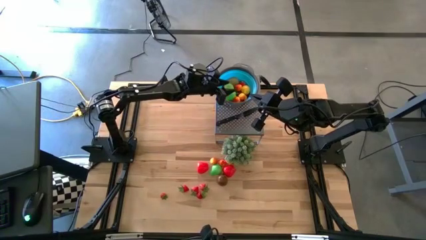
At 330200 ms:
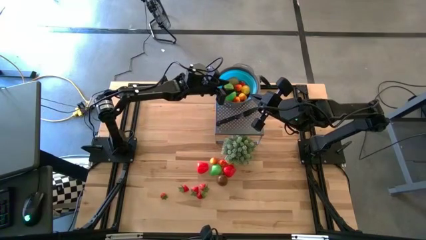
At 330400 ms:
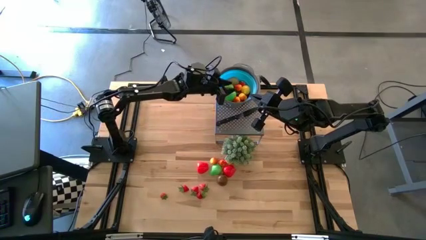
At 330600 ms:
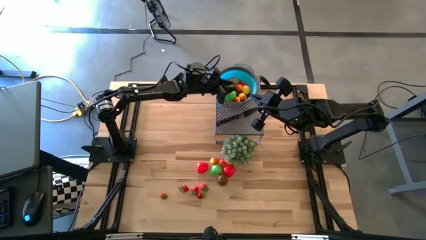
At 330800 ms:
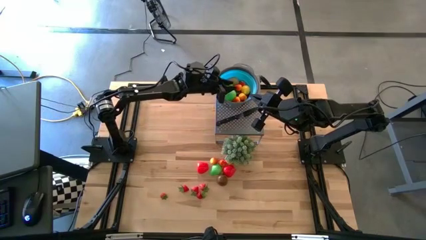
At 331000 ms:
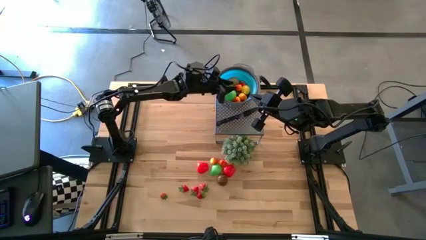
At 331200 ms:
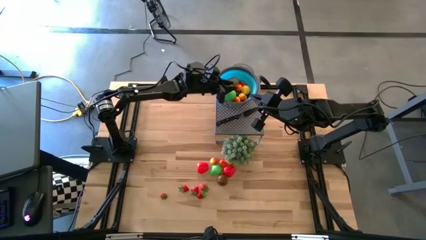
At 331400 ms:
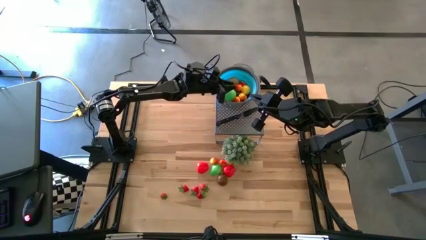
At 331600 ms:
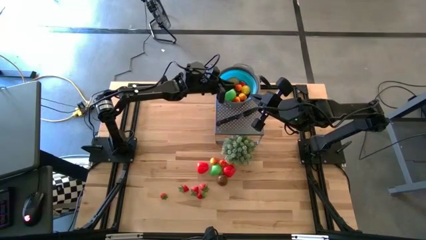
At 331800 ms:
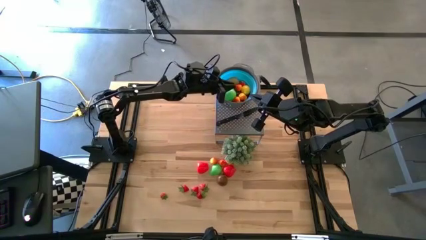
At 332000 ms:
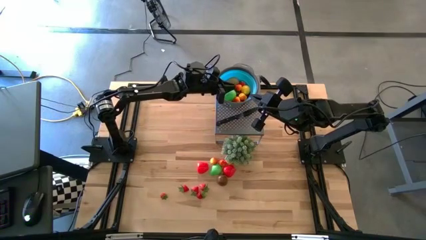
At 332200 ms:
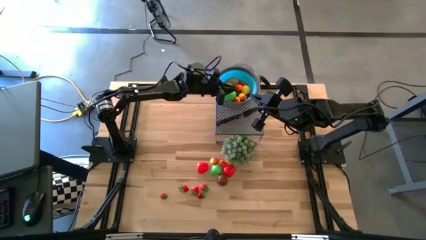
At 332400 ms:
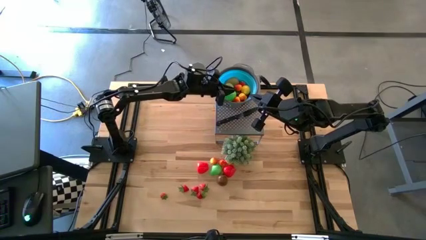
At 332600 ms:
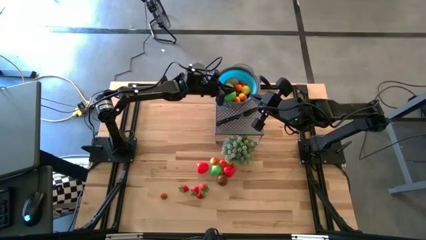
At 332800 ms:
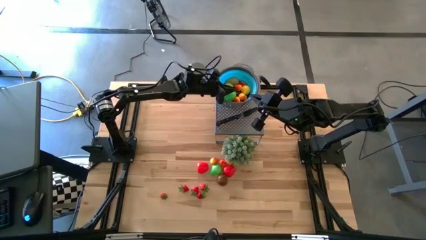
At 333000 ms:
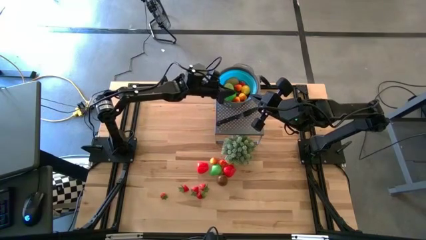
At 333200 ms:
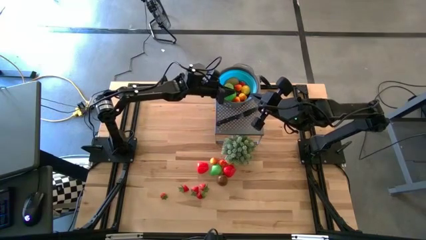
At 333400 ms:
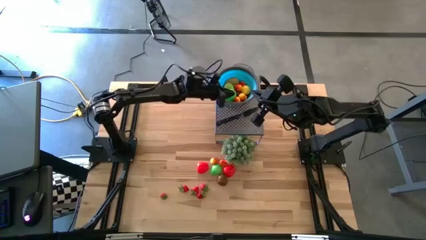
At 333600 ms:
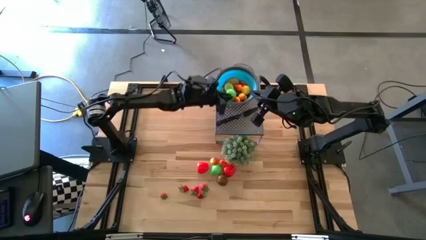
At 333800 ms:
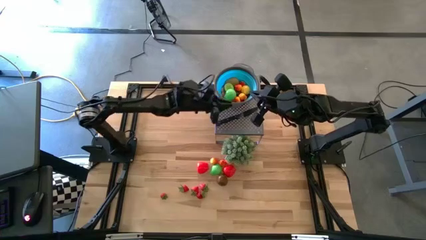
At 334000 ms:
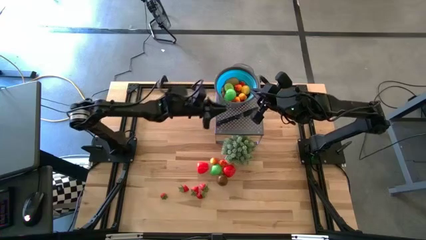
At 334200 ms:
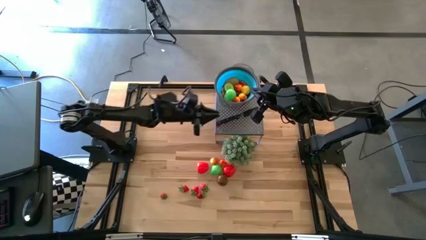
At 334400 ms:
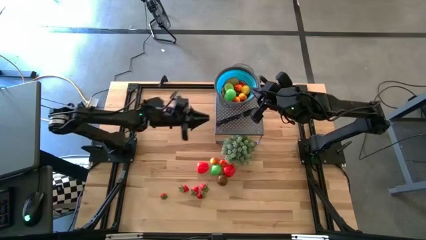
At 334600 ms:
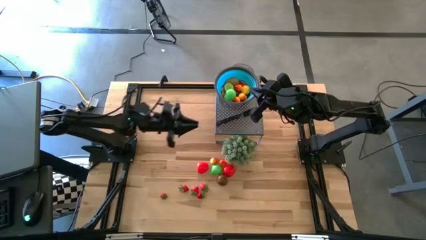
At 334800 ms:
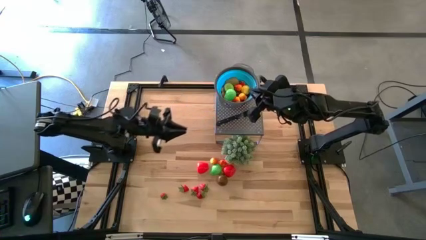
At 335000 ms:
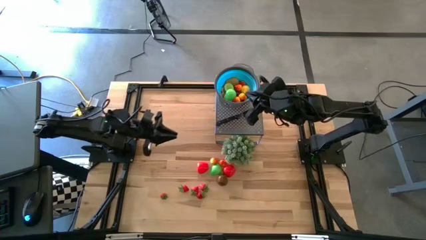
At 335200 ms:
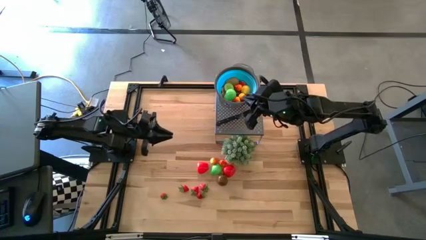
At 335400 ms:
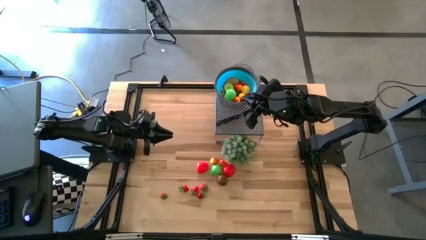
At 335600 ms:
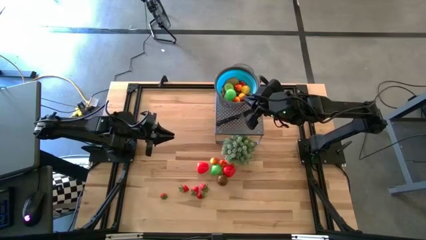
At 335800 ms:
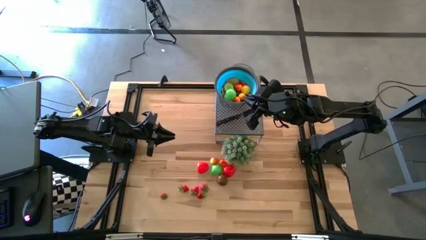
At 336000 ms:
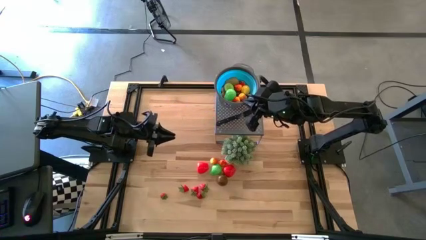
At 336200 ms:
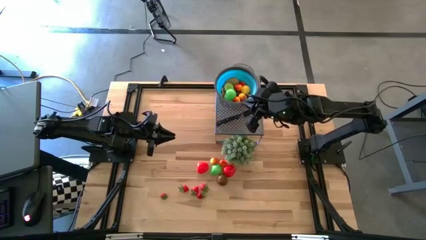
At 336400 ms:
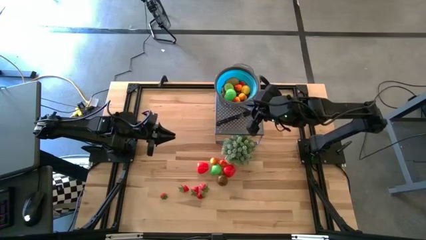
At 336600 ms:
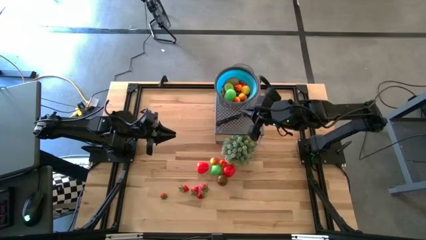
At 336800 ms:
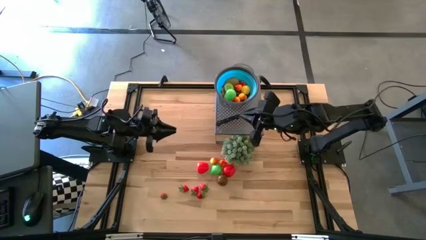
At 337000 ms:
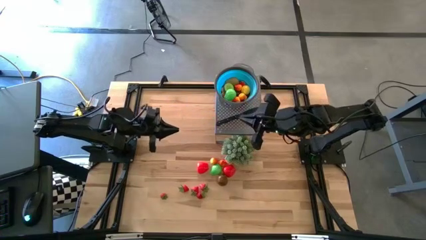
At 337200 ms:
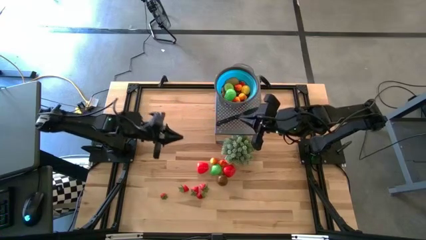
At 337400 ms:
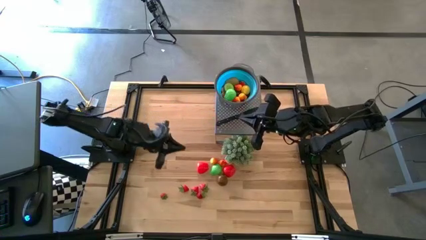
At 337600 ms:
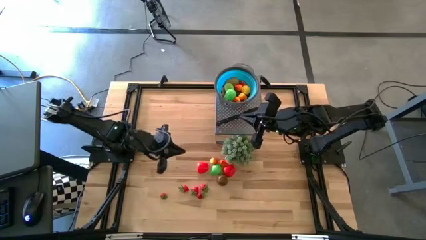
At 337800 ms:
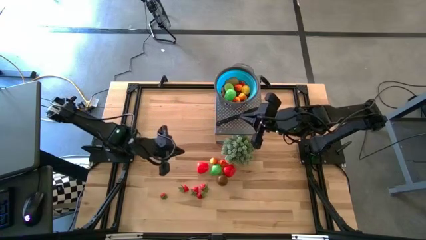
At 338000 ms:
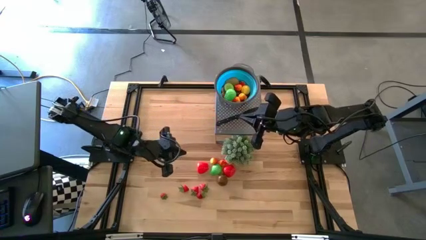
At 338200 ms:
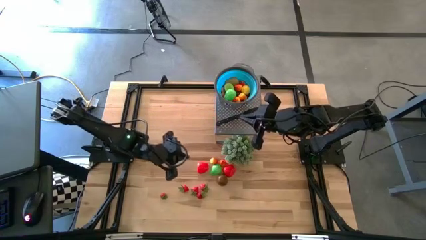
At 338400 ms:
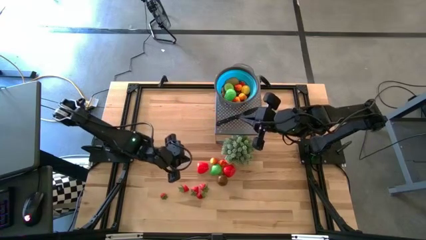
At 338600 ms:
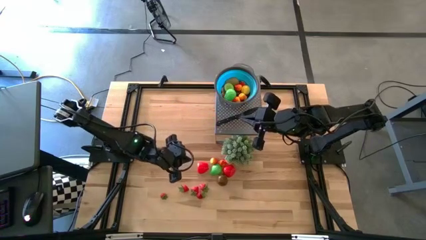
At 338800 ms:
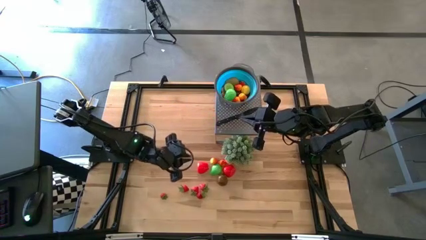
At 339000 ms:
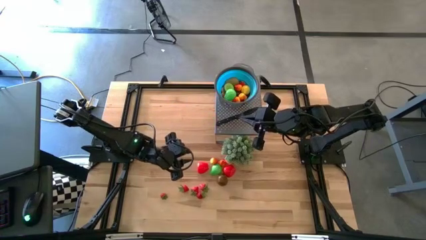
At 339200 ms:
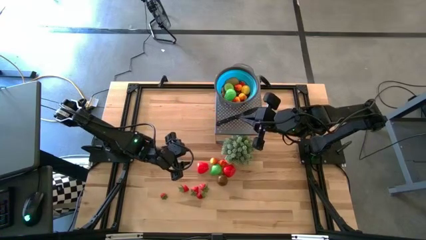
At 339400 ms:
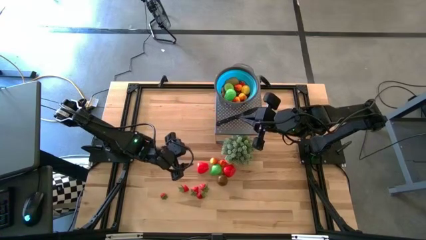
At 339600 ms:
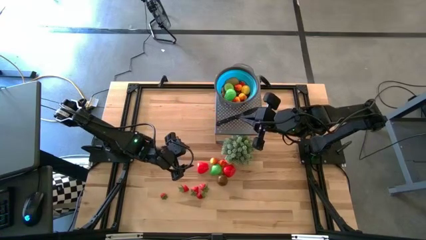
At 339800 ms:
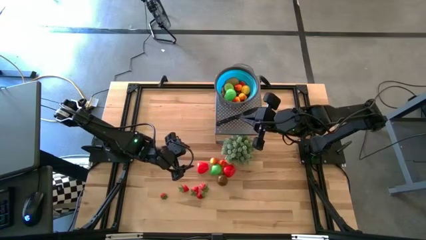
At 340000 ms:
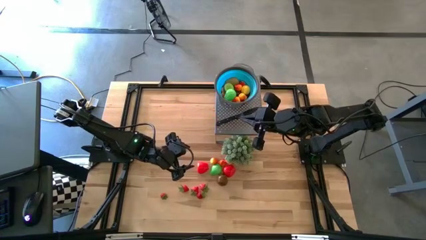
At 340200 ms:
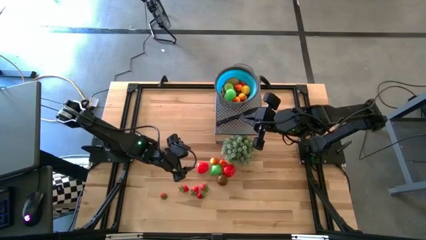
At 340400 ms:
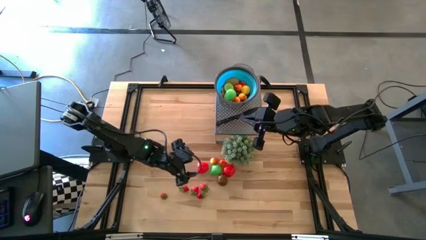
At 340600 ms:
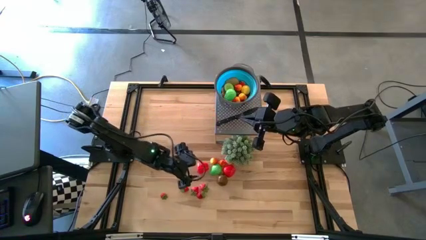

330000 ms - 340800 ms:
Task: Pick & Place Fruit
Put the red apple into the blue strainer bowl

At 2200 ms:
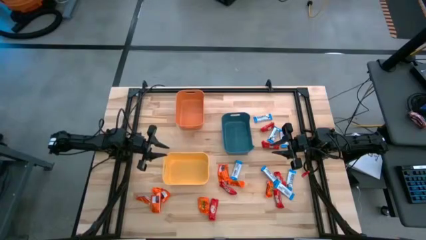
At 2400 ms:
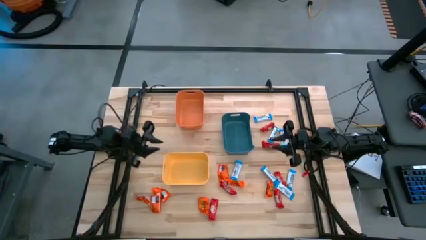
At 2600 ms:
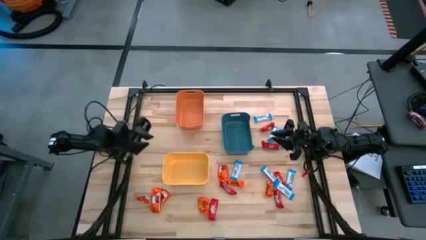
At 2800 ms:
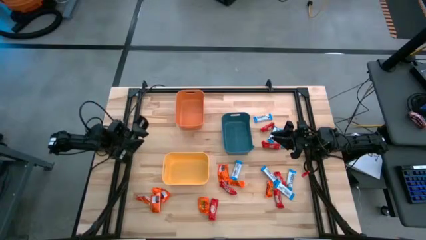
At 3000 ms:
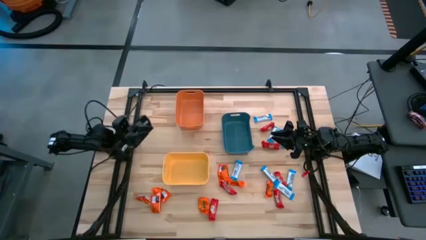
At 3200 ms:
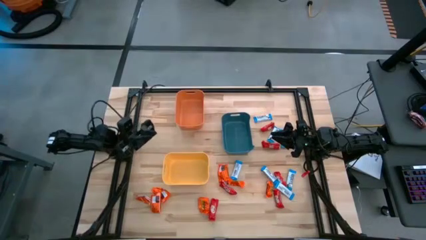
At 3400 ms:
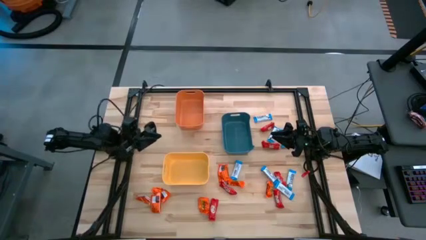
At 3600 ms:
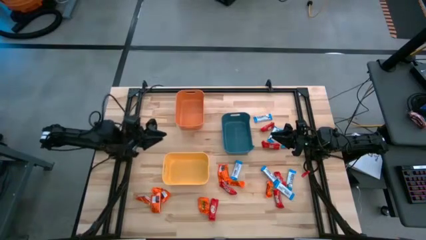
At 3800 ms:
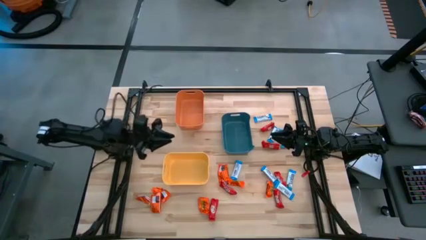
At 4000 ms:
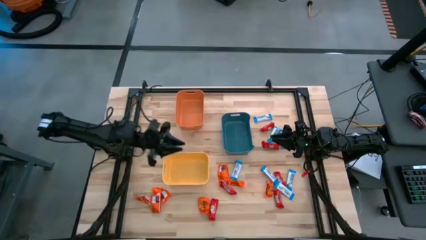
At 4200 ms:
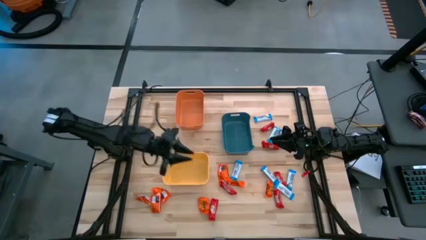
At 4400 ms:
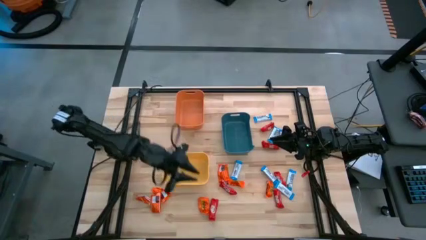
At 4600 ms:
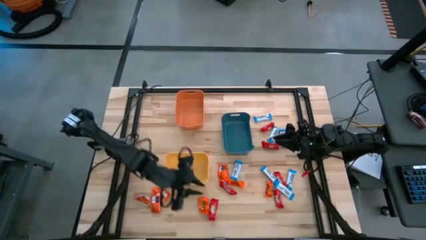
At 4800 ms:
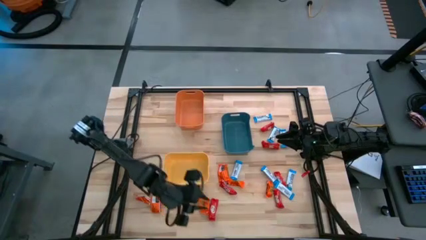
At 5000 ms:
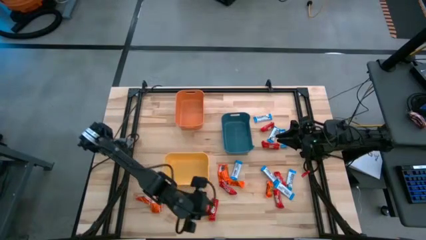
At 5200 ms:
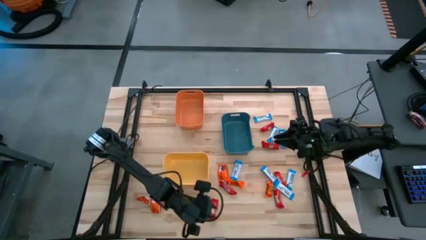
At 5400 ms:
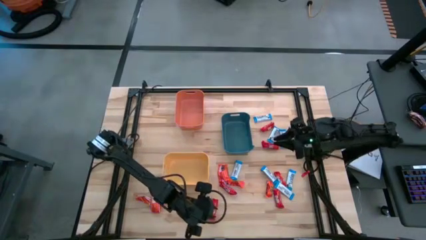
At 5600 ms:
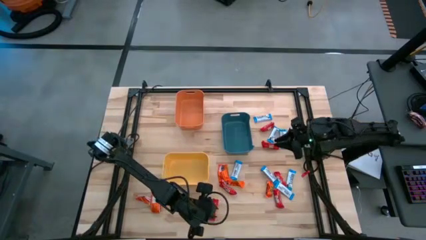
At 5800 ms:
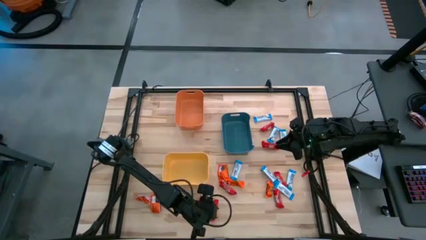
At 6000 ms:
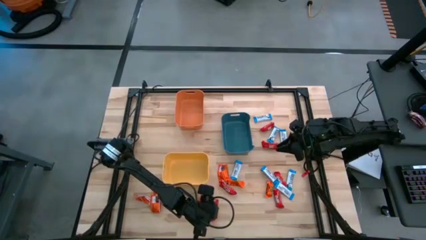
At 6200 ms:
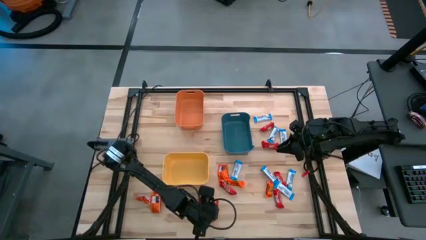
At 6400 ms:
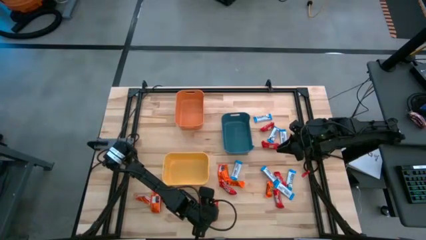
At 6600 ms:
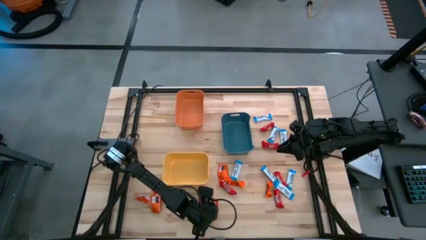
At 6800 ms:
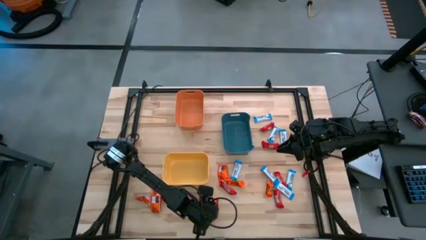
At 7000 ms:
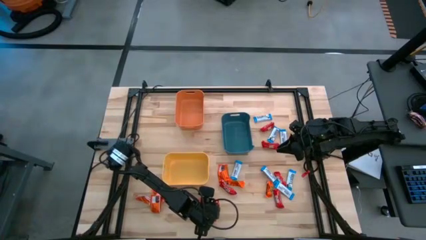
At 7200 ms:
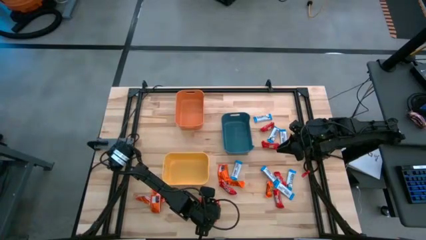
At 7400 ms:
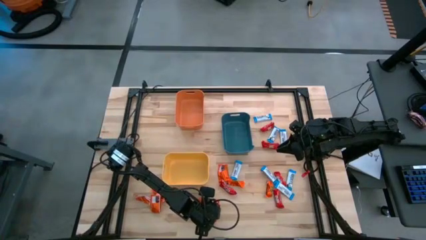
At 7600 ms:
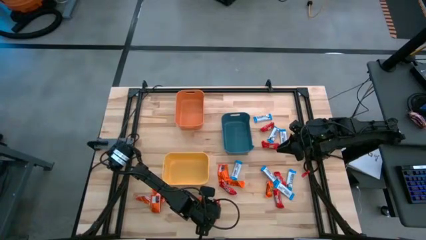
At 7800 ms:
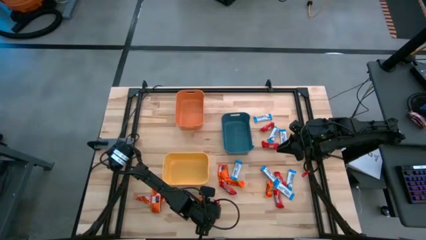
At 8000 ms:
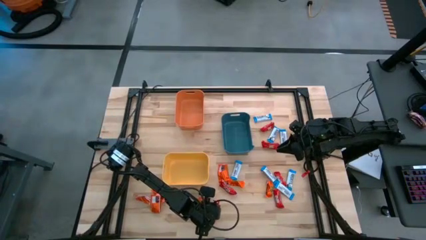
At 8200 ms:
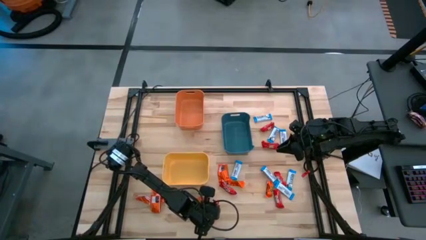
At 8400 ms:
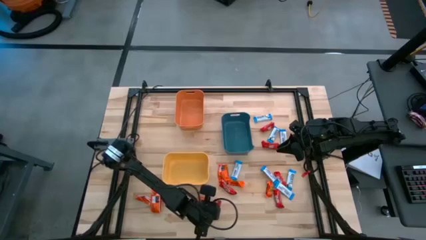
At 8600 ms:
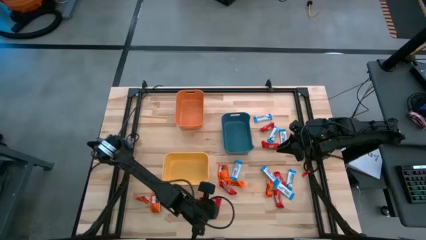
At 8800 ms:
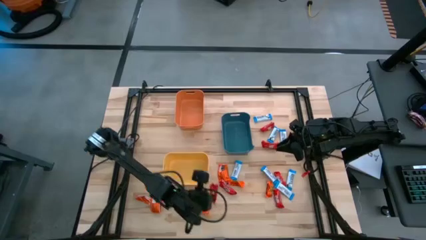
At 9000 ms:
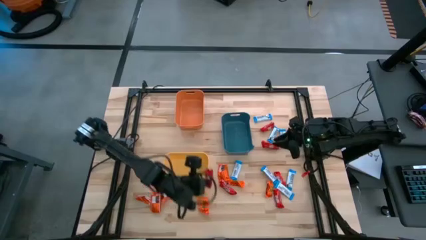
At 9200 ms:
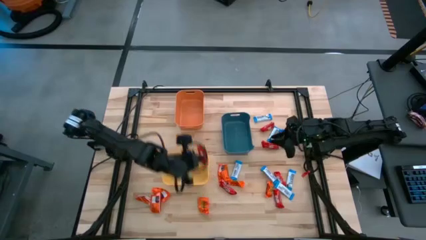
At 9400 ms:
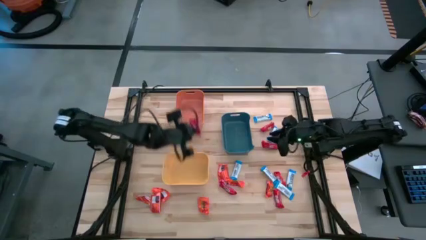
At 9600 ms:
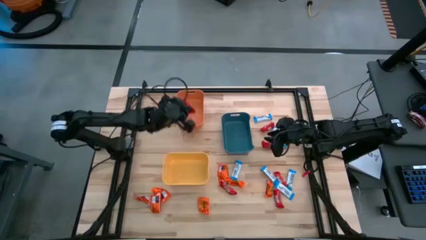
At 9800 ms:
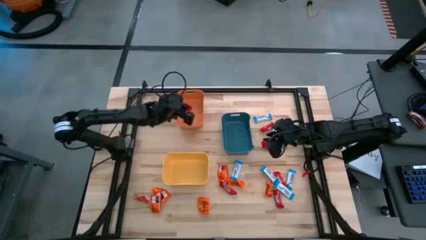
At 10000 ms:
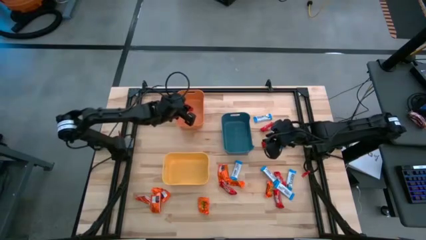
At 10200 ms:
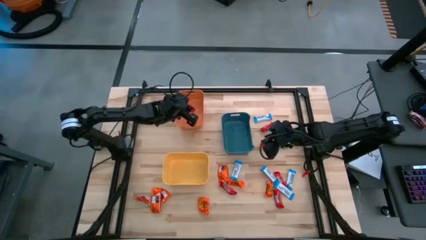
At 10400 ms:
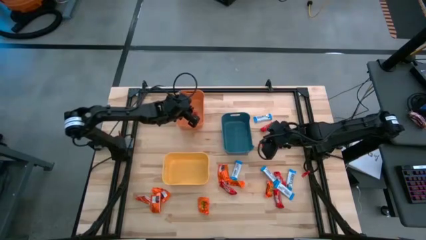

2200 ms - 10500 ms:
Task: Organize candy in baskets
Put the red chocolate into the orange bin
